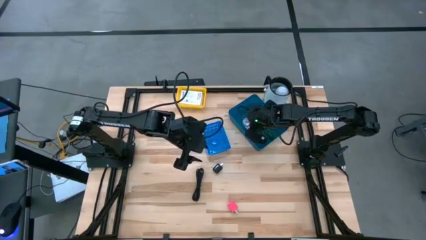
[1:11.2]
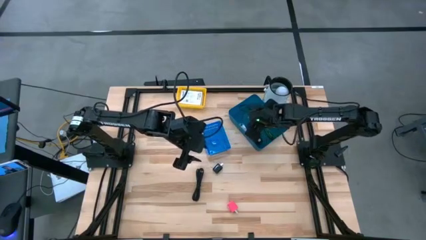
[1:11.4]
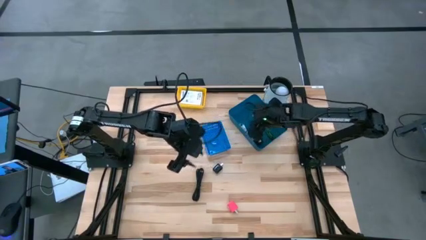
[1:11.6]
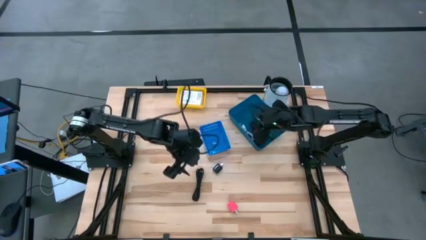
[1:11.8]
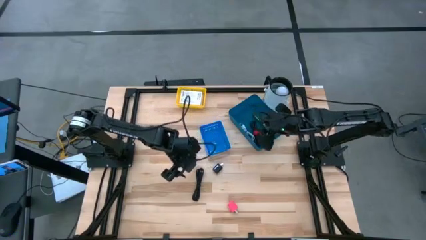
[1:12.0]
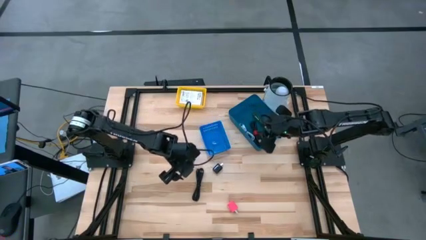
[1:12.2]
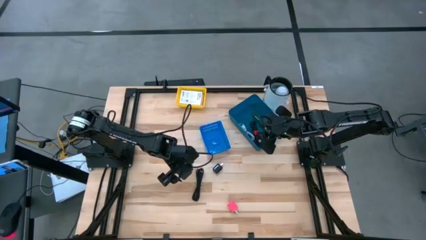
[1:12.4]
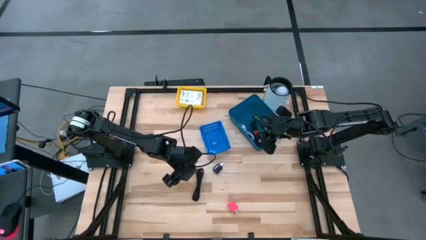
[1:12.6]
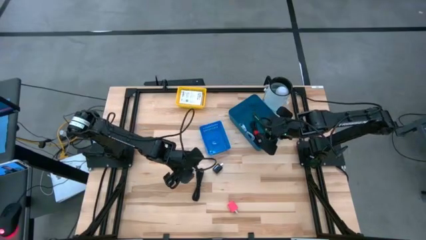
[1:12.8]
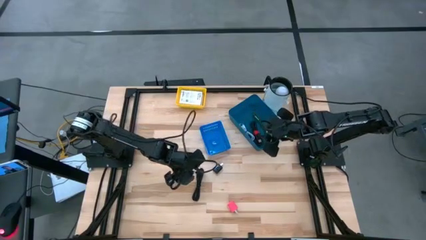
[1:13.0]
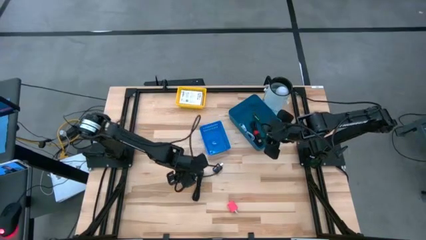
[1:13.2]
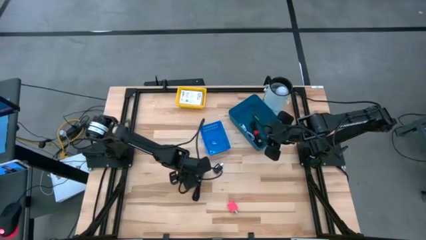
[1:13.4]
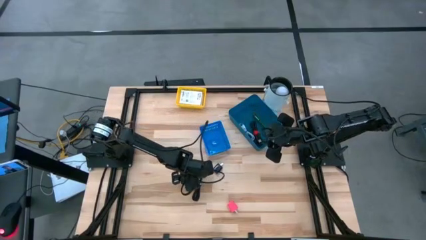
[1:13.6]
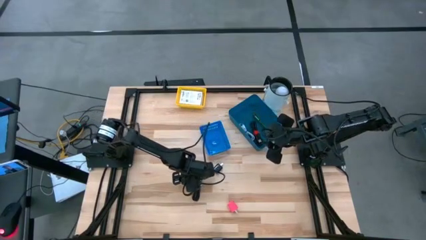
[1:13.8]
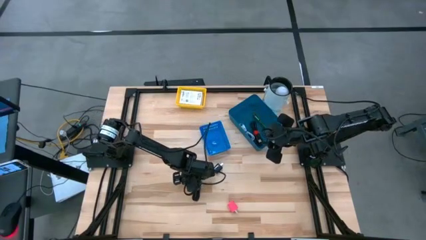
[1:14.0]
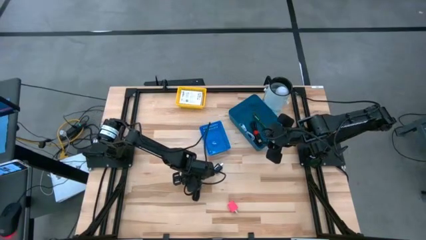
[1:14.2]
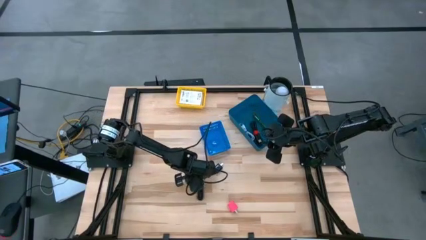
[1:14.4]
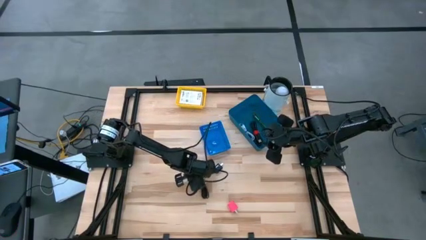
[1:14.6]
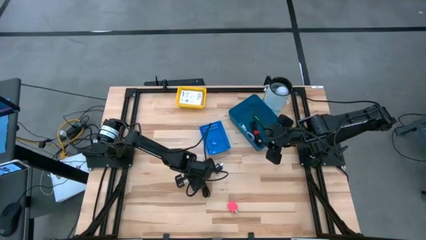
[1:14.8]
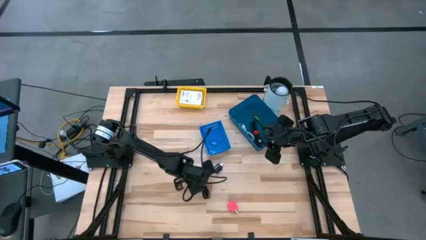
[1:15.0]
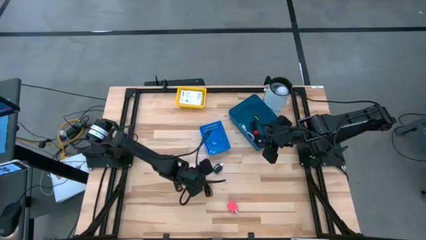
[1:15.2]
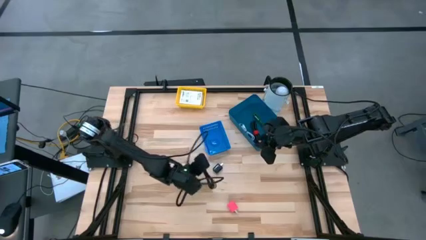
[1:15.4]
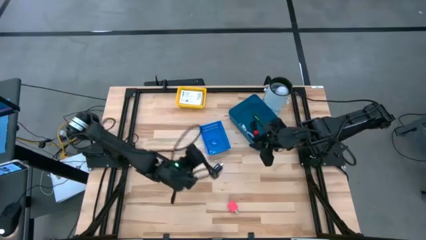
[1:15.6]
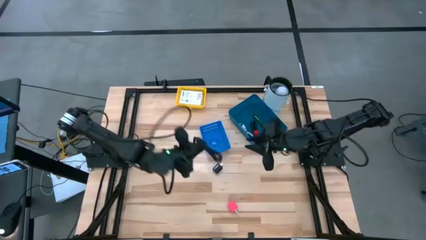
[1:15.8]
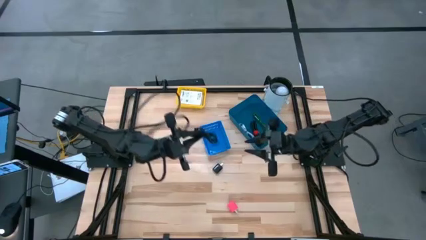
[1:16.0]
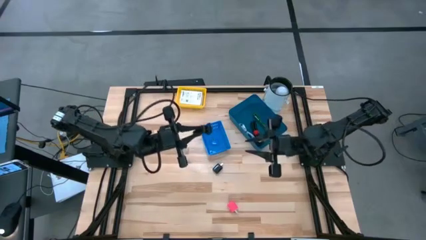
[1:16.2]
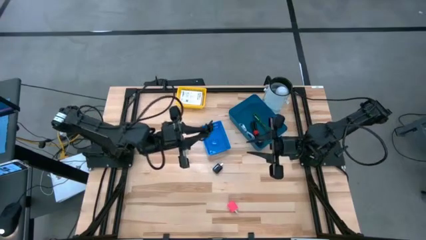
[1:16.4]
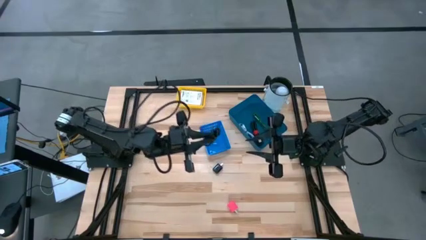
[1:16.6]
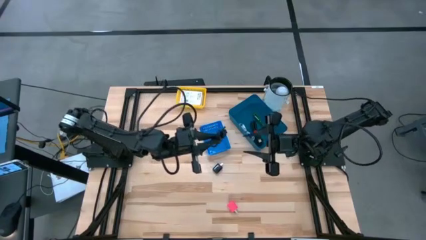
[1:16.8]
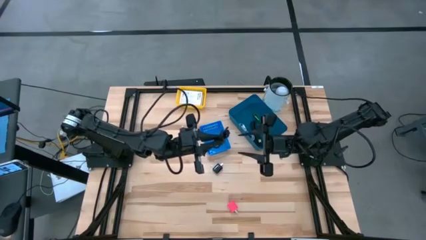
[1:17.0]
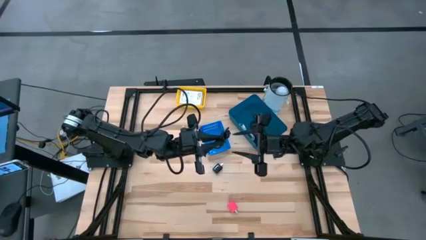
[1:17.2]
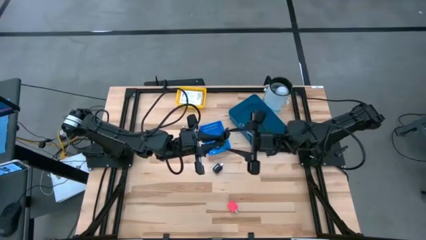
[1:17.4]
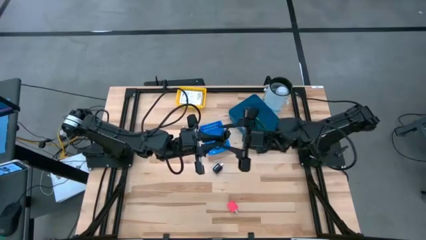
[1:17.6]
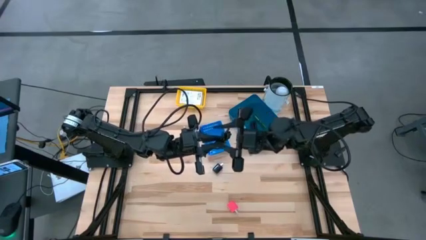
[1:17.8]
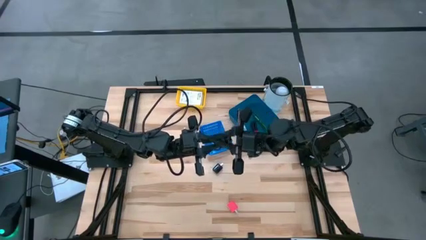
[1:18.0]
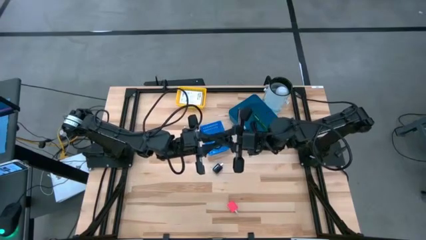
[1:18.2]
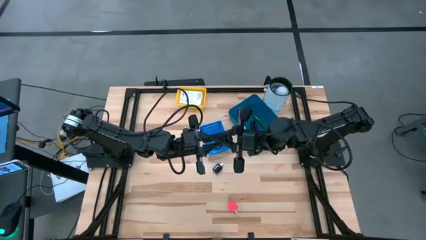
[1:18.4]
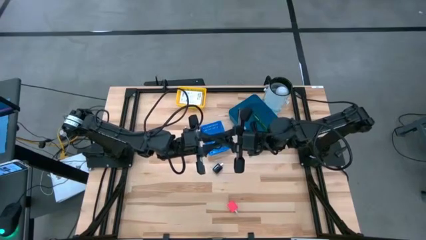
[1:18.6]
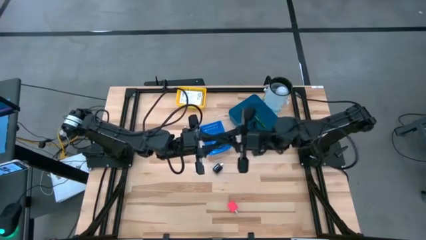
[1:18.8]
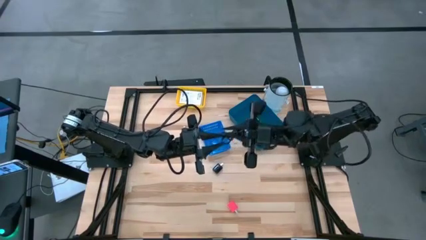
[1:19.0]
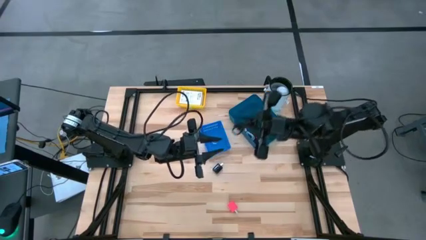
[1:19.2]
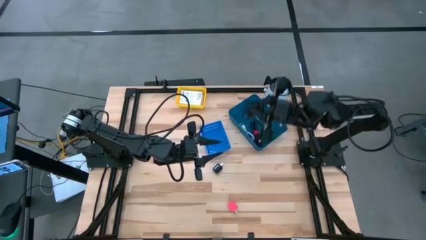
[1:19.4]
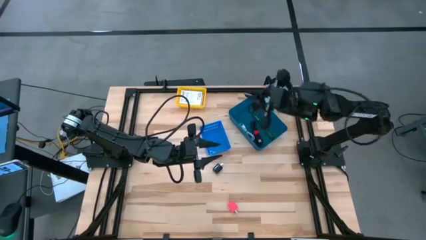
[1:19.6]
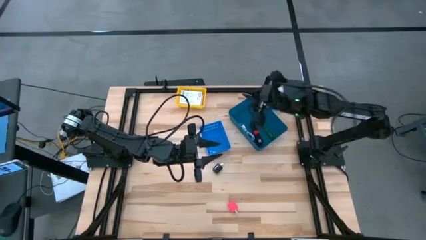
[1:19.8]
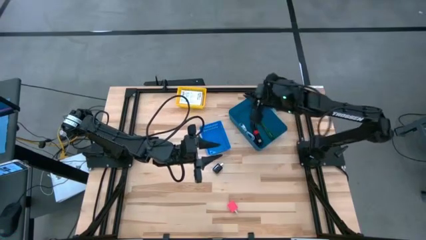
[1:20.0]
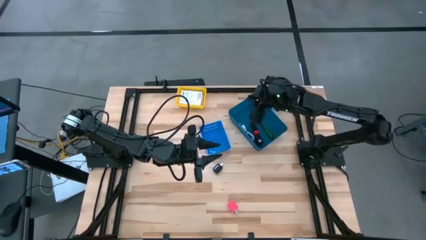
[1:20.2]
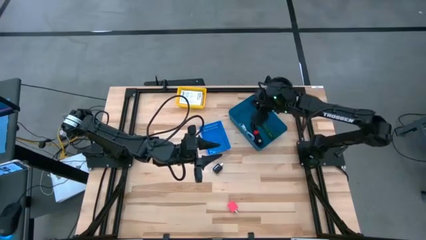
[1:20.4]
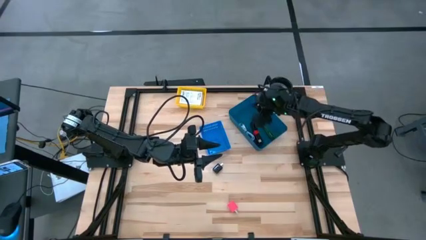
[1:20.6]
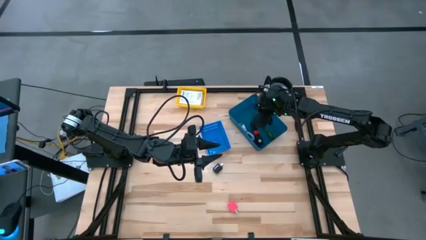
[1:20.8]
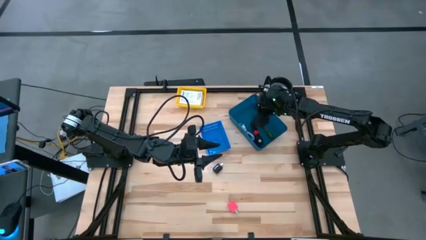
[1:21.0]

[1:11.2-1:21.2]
Task: Pick and place items into bin
Put the black charger cable into the dark blue bin

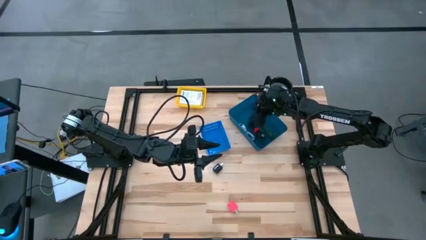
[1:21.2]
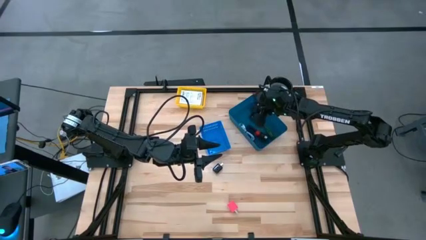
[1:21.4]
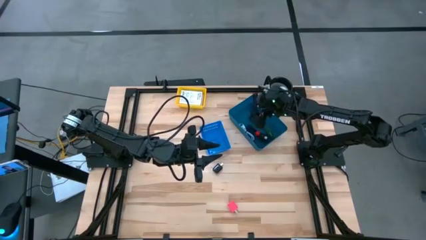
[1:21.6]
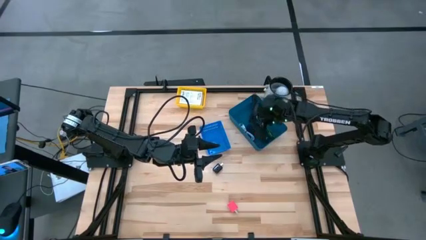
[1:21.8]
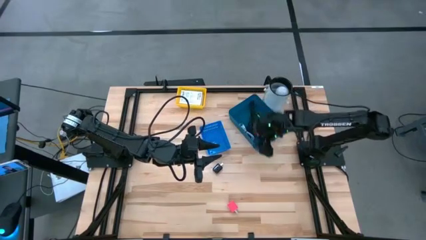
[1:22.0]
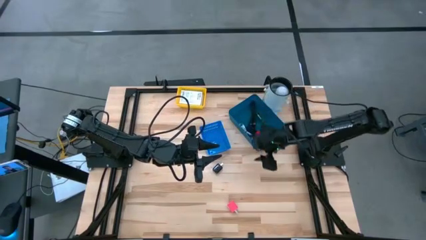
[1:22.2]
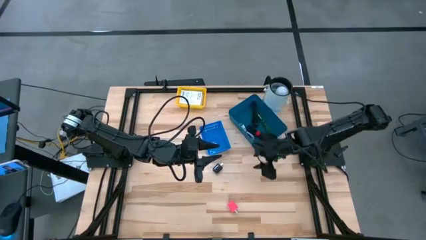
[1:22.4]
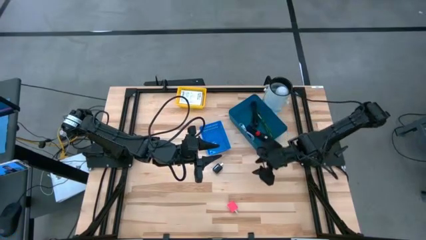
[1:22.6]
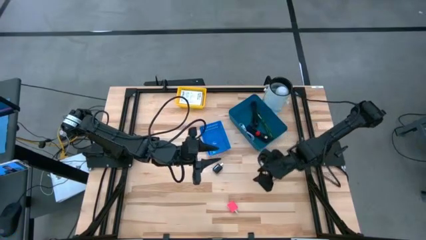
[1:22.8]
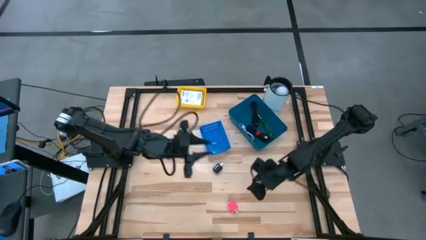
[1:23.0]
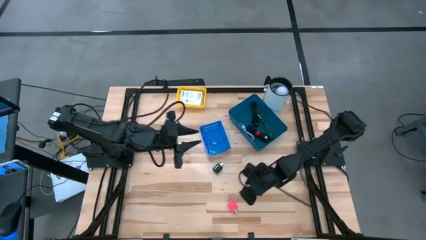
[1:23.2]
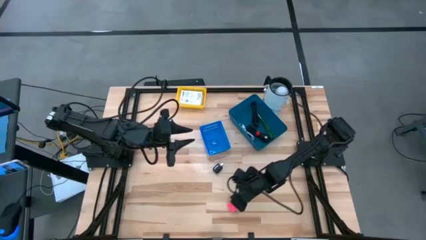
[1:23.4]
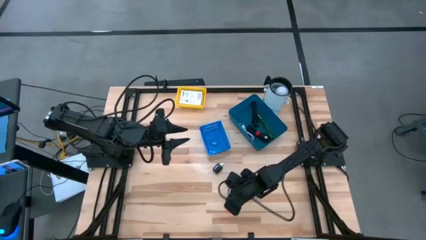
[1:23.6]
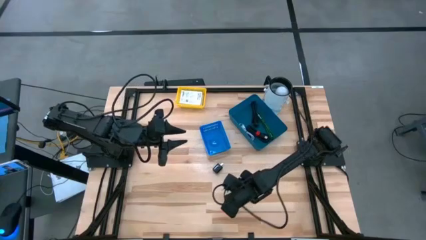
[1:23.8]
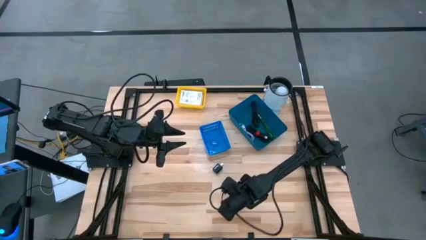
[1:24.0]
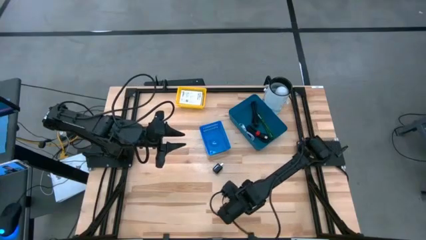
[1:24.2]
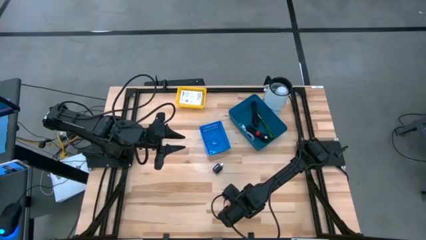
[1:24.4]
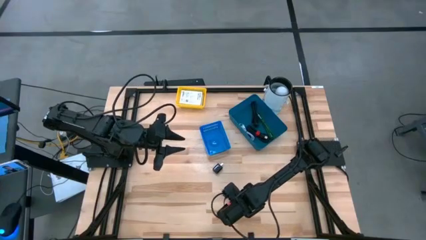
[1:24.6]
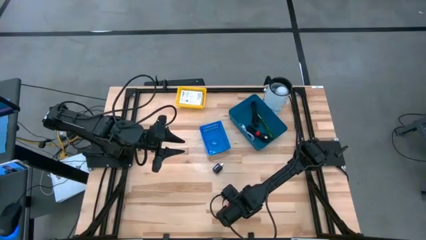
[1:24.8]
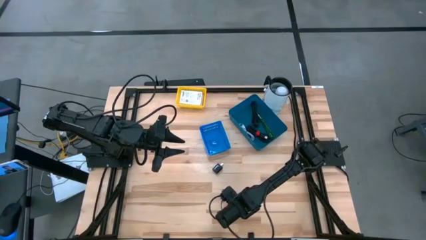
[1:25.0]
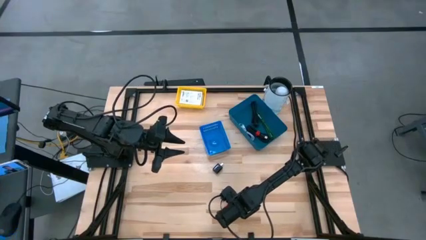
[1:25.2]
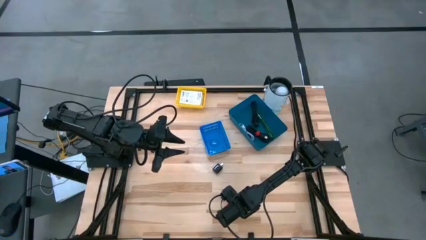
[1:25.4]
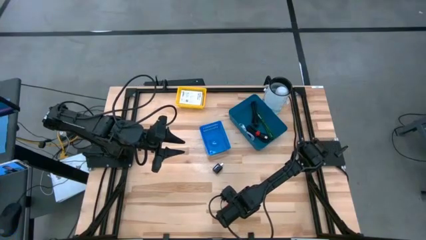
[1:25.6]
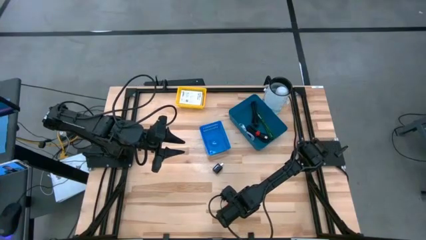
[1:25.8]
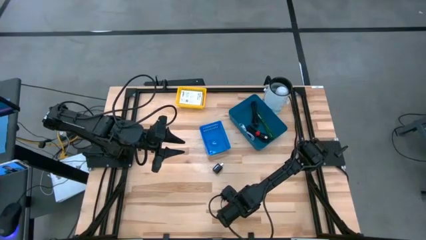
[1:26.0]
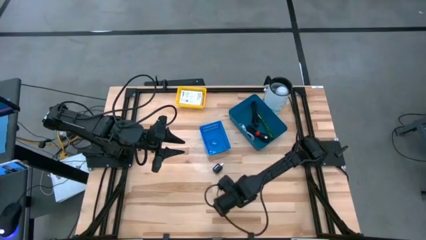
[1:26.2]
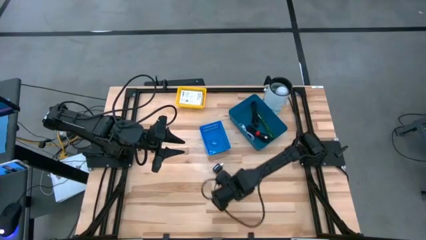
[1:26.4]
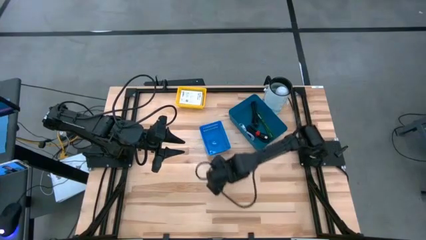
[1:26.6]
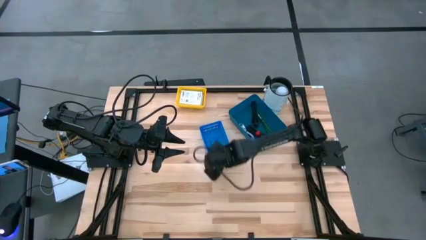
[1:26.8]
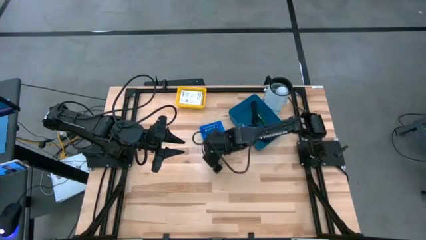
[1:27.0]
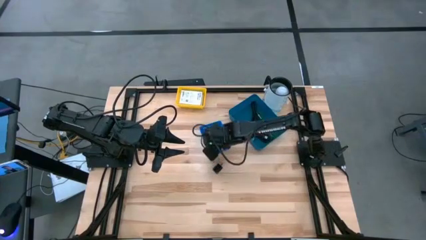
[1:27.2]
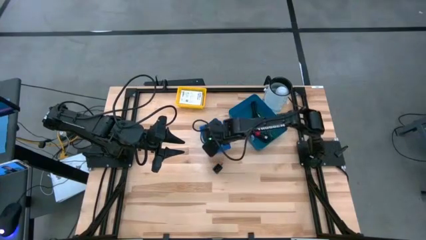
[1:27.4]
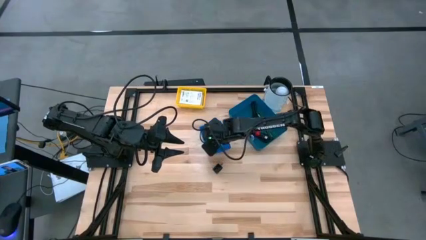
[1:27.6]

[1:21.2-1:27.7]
Put the pink charger adapter into the blue bin
